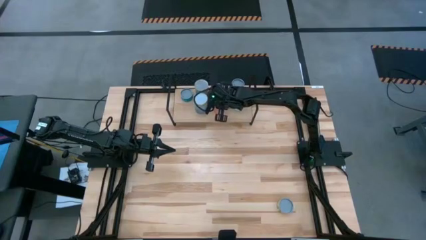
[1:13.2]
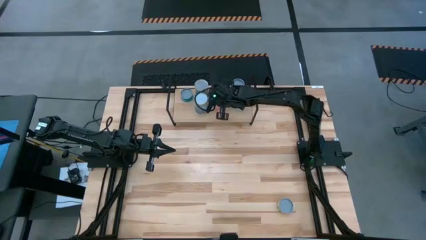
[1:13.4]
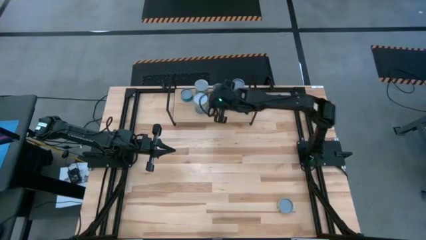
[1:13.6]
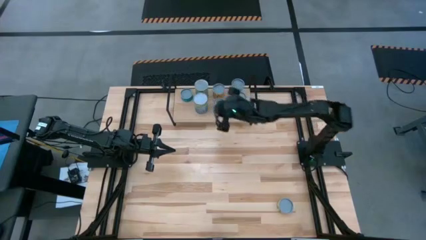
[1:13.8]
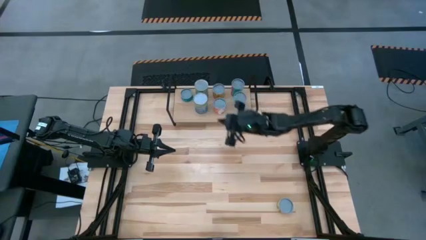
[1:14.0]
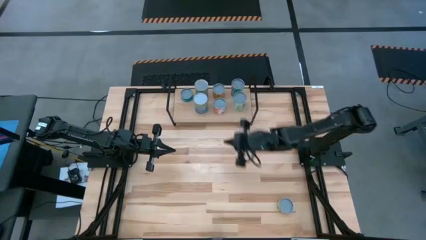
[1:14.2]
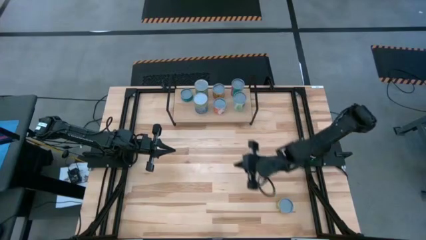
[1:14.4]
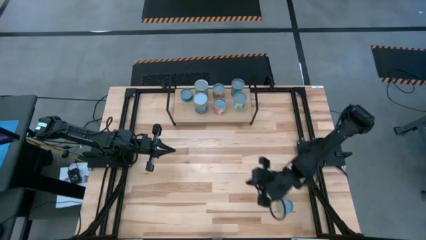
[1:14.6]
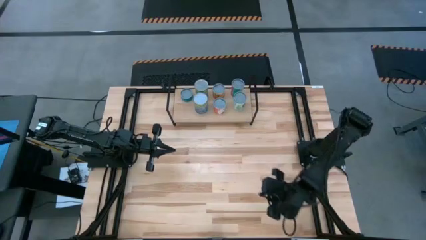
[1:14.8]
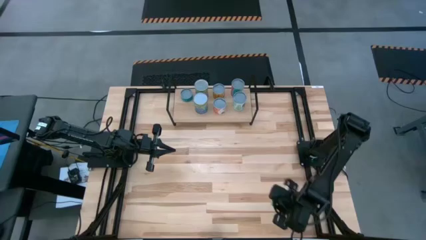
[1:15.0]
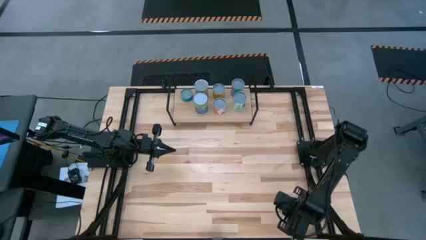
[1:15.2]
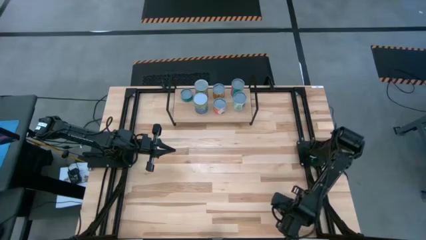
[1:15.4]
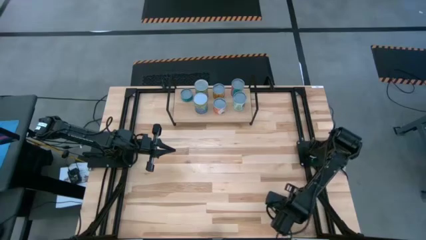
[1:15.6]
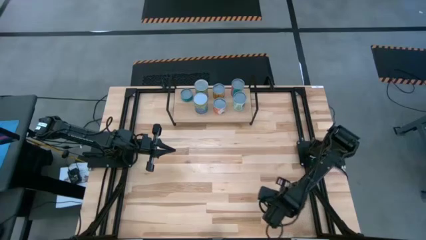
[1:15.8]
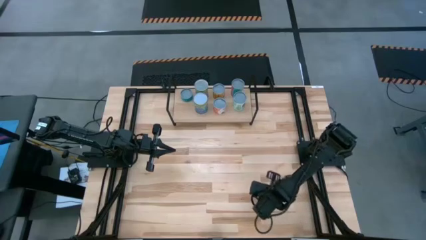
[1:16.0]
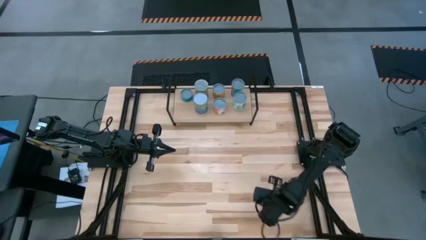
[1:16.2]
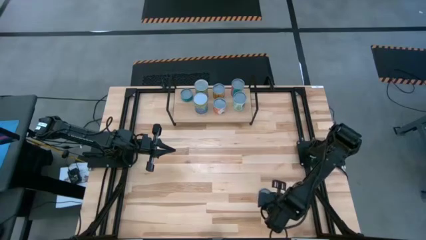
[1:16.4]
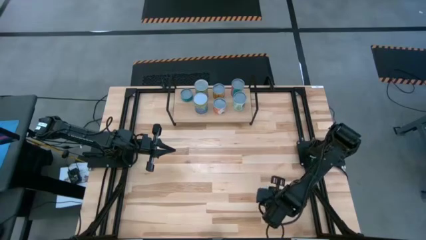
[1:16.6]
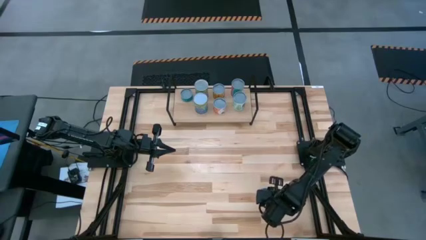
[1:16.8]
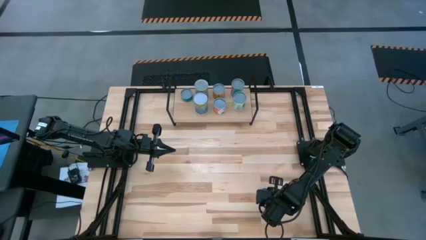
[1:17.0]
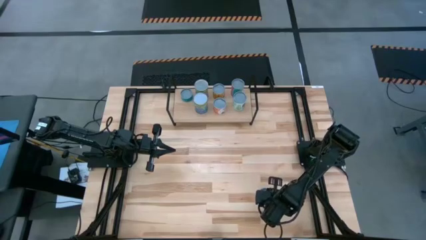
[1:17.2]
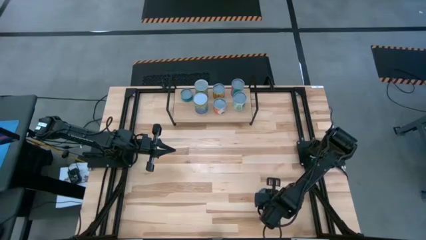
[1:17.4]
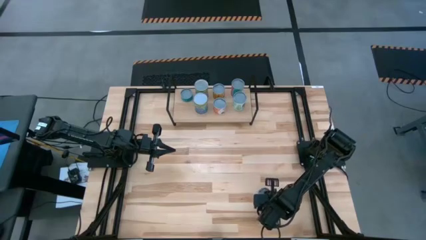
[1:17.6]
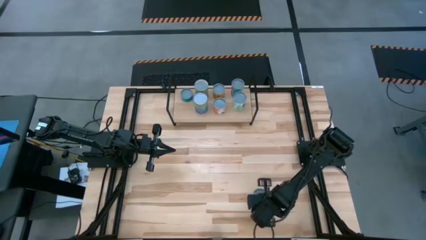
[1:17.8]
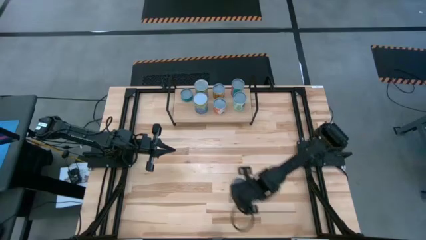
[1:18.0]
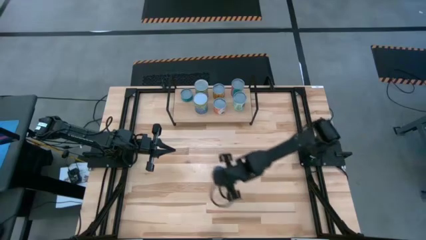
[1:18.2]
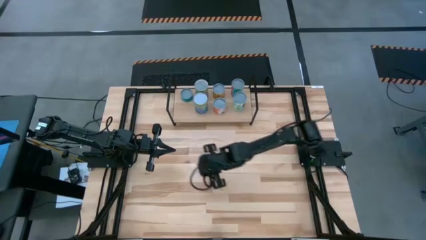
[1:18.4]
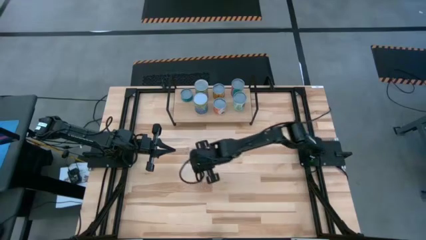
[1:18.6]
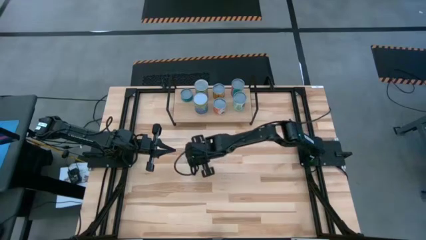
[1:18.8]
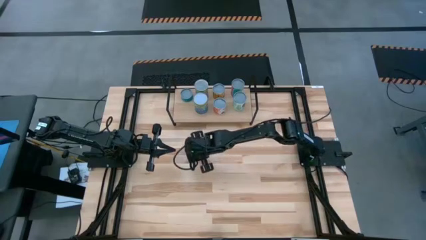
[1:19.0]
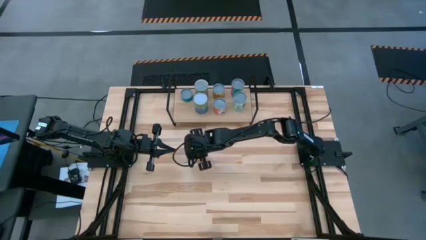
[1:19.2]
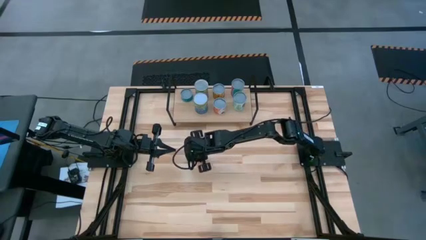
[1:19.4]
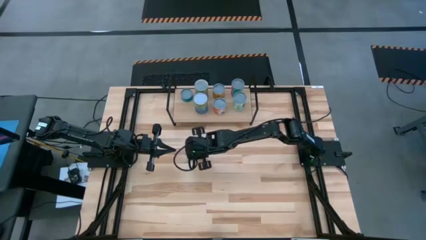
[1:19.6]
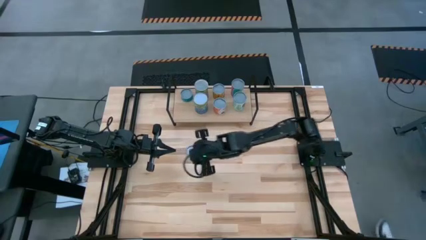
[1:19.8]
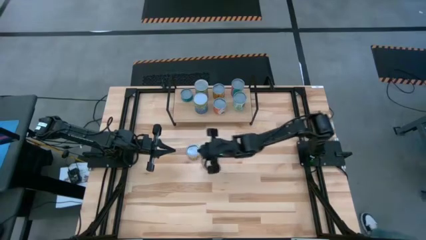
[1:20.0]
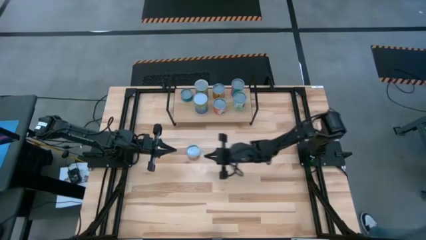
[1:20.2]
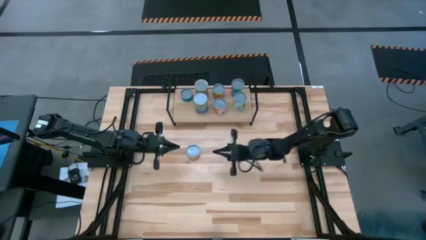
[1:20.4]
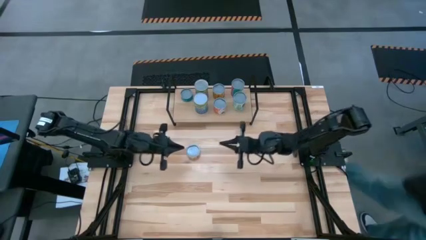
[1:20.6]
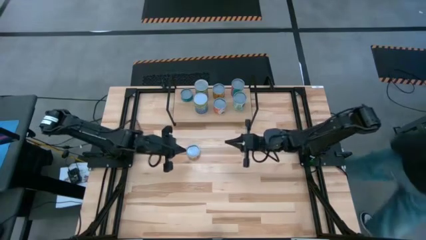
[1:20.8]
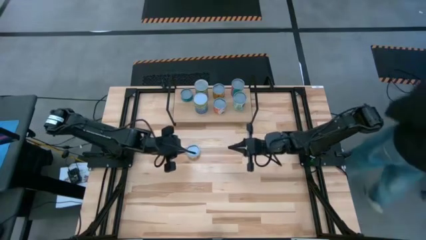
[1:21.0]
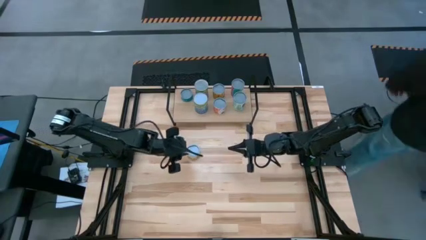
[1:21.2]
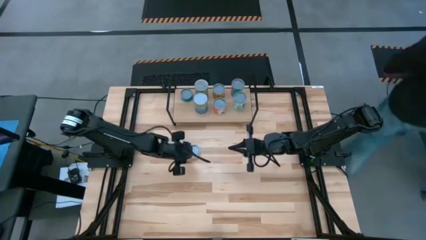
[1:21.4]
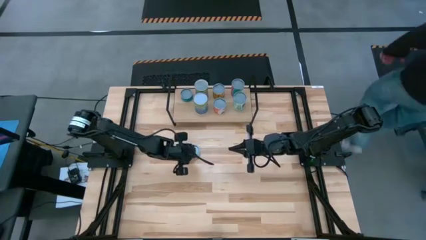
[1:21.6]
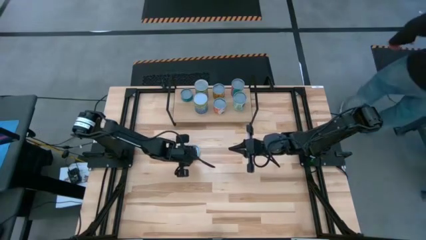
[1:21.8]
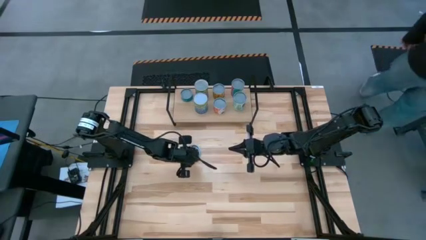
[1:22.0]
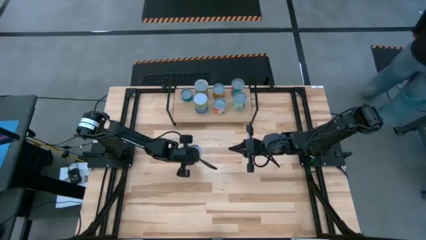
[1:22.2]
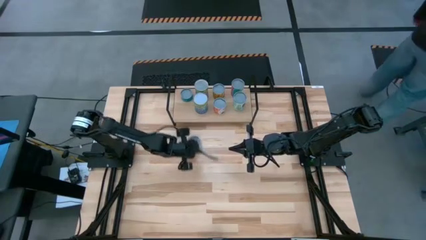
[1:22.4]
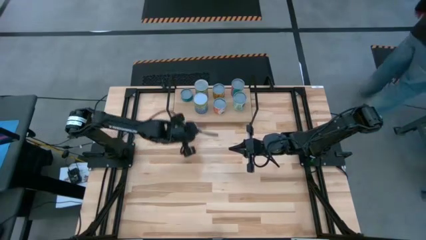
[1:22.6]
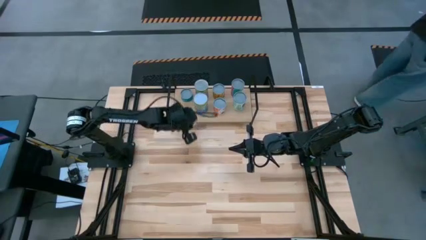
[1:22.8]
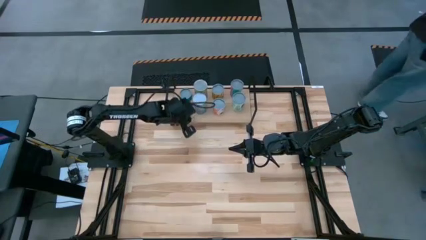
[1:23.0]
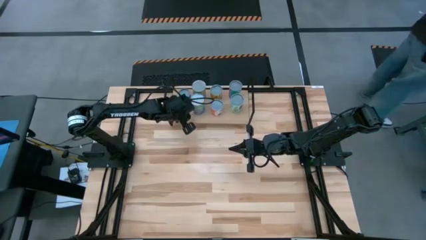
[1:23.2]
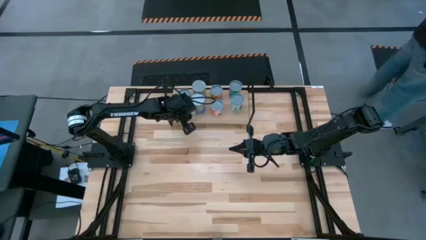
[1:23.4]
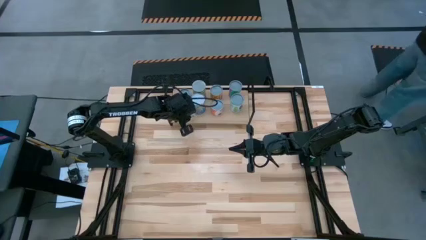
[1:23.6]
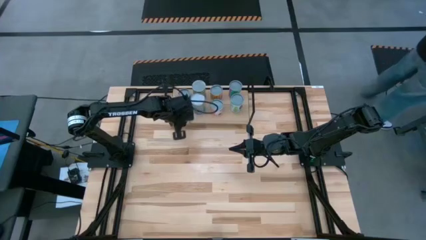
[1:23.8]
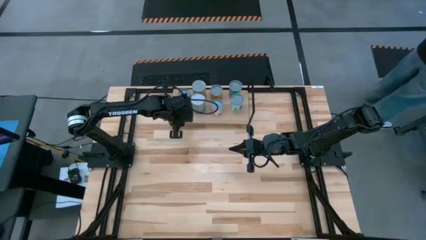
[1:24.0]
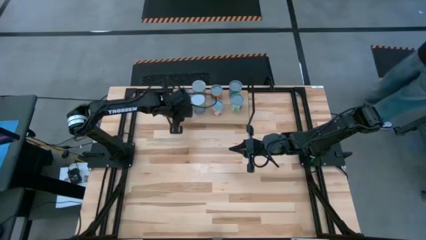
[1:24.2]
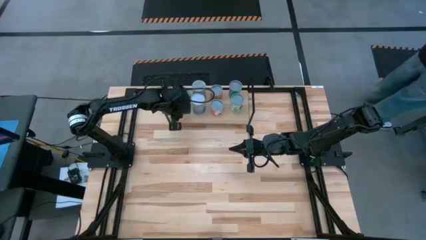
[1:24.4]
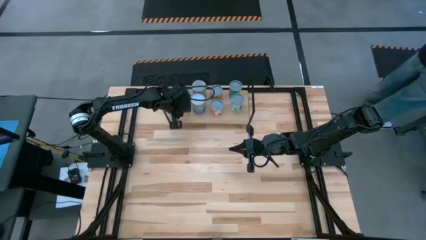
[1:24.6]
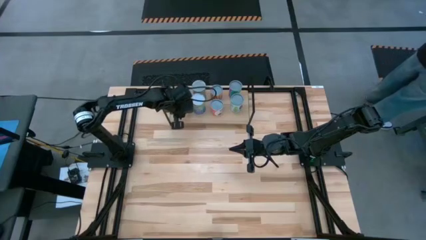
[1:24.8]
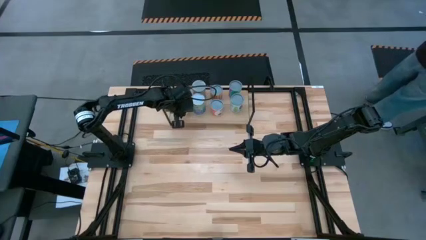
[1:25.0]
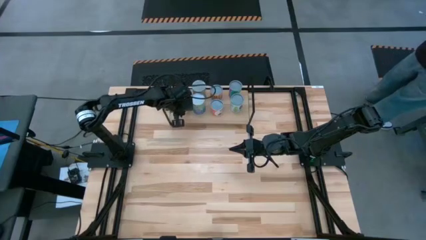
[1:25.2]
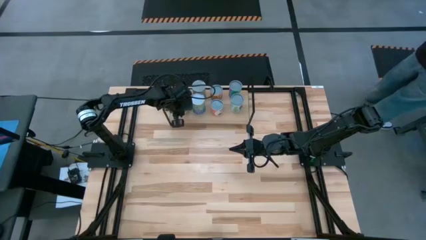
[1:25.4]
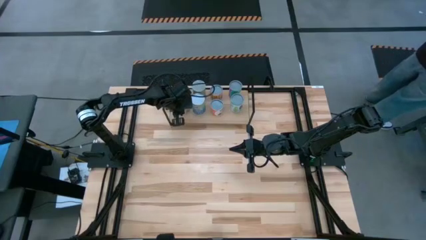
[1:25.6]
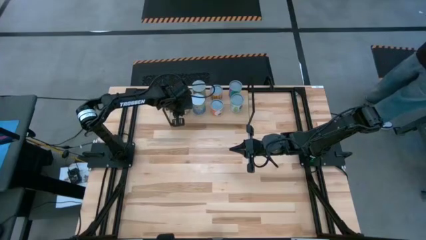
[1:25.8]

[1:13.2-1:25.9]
Task: Pick and place cans onto a shelf
Put the canned mushrooms on the shelf
